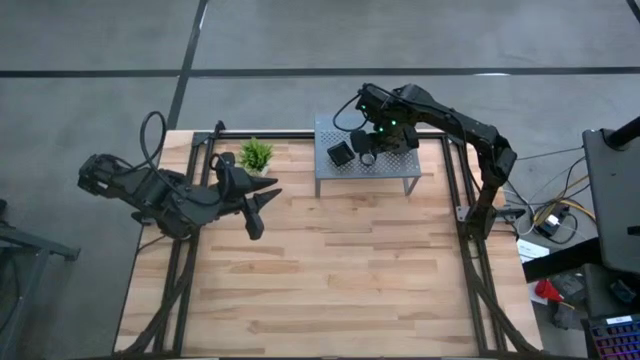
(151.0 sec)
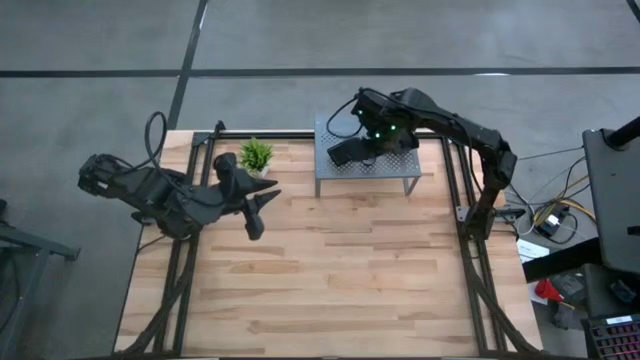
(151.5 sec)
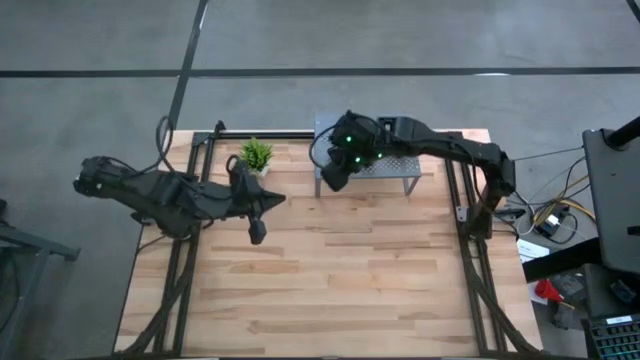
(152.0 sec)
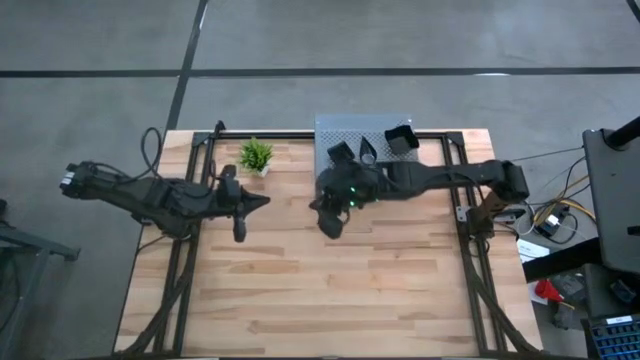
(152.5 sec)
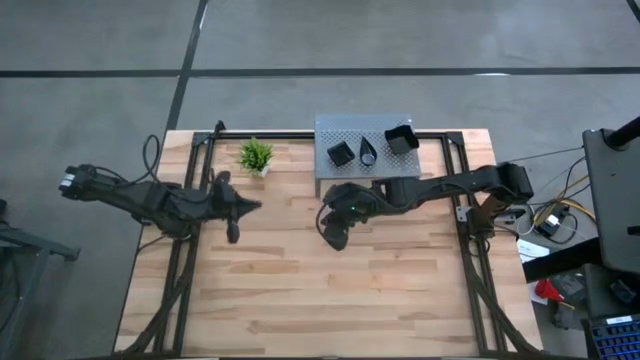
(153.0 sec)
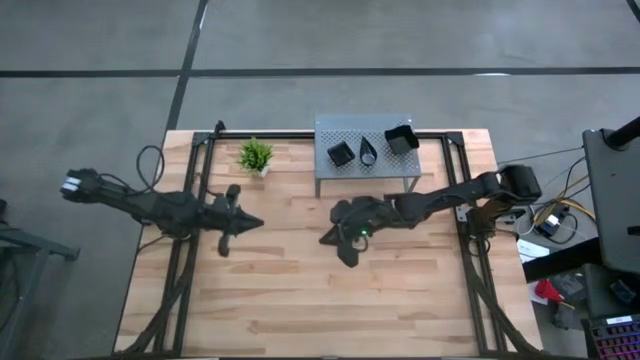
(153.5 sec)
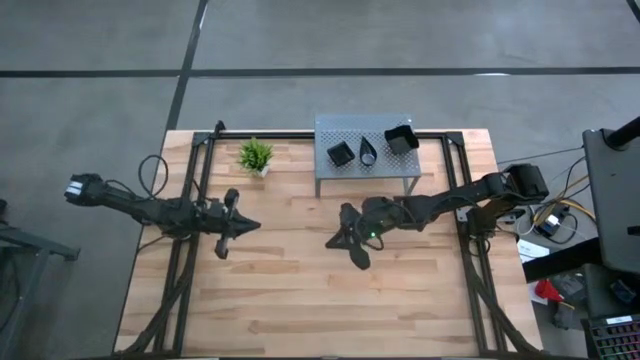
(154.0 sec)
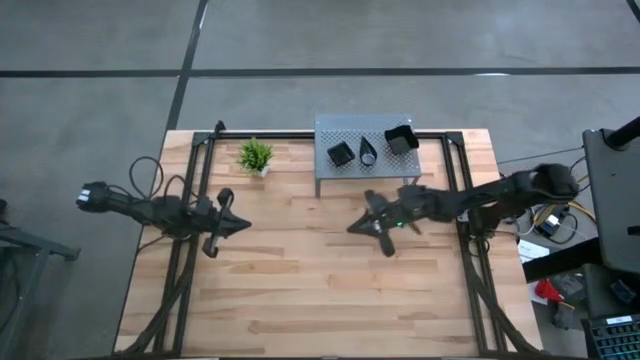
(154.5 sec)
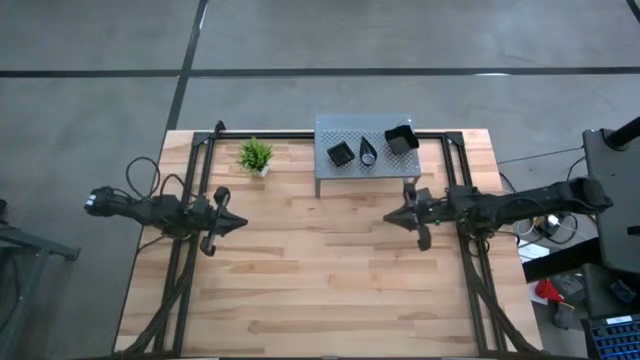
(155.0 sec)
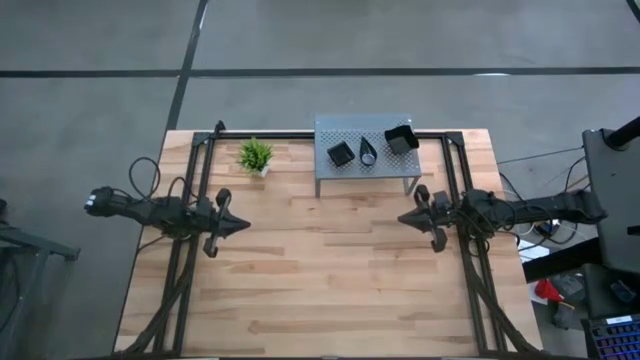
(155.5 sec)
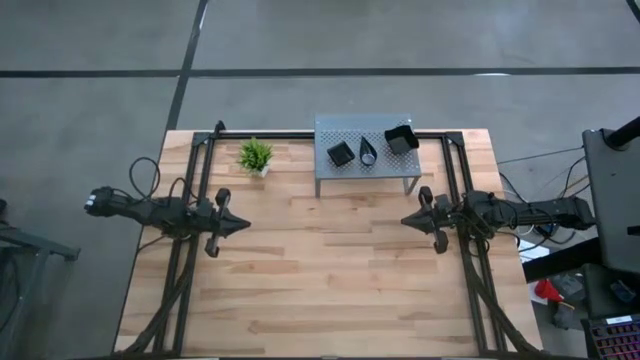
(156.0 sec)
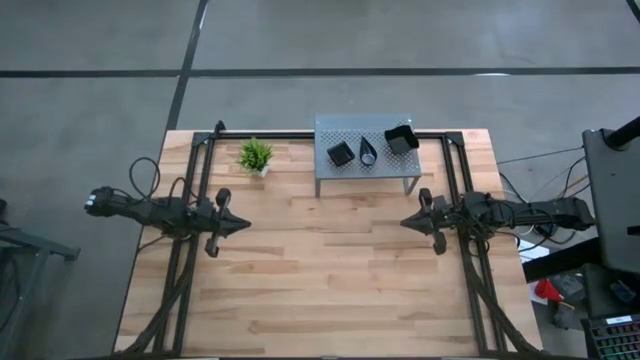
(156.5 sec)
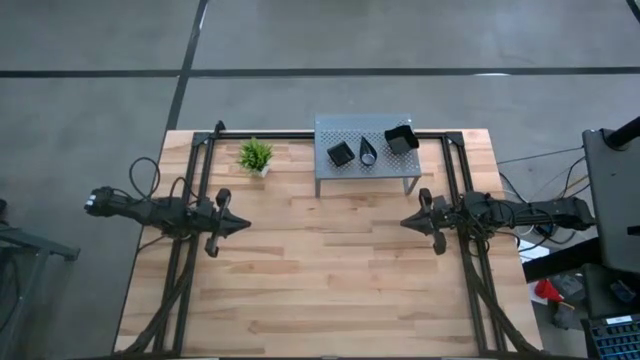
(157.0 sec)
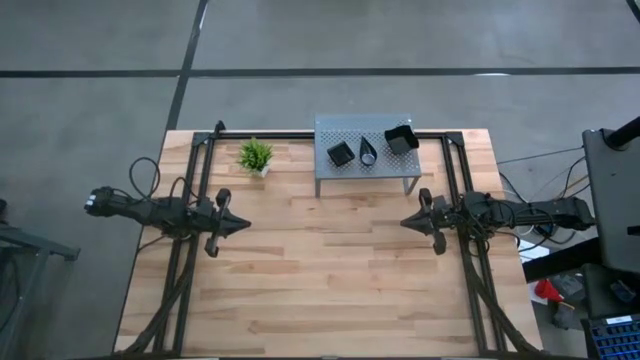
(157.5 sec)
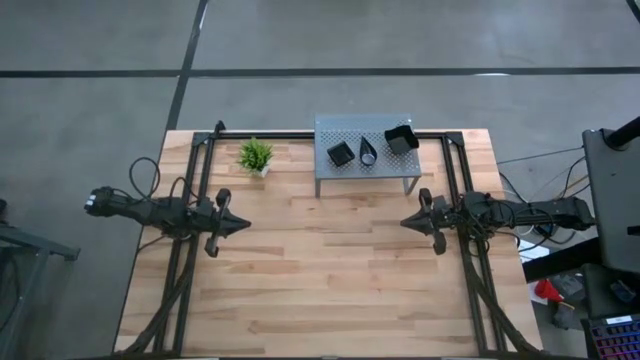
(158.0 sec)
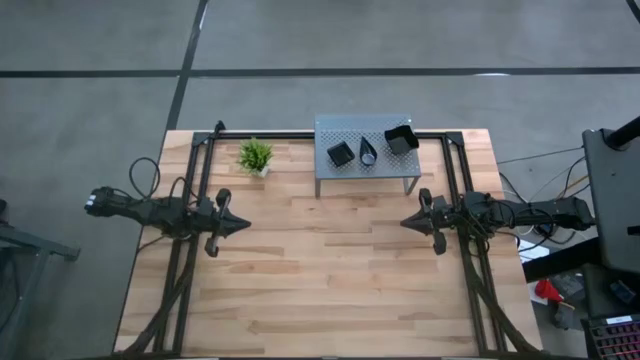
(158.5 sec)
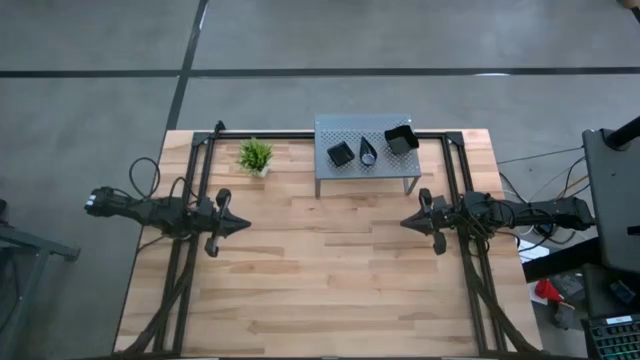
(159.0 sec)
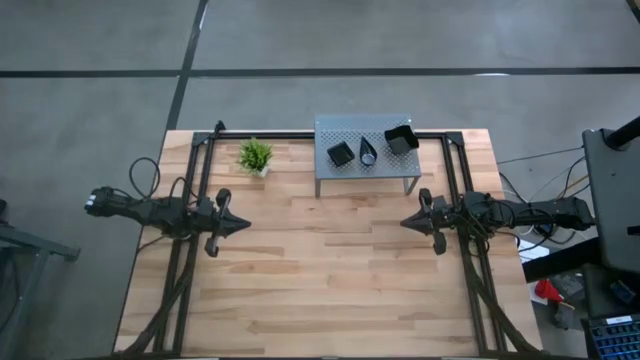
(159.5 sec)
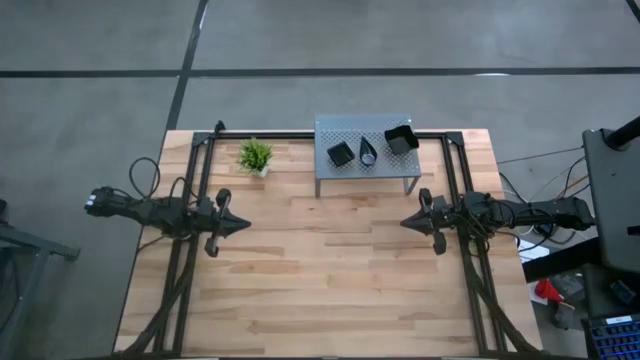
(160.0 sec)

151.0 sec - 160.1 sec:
Task: Pick & Place Mini shaped plates
Return to Home Position

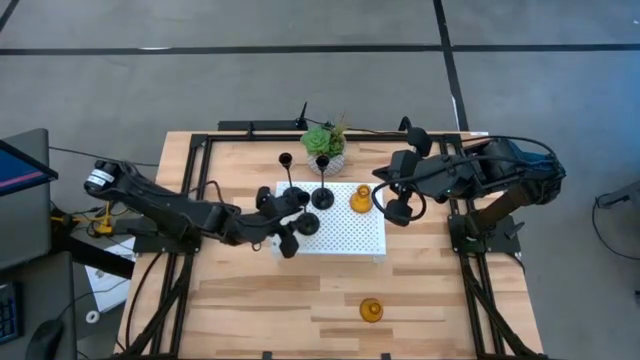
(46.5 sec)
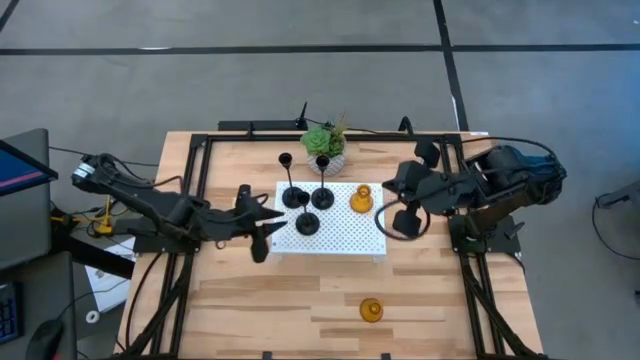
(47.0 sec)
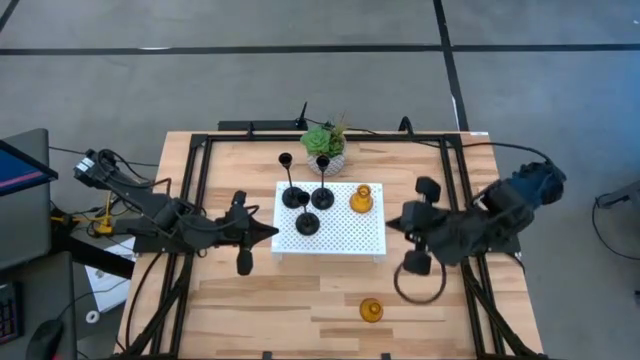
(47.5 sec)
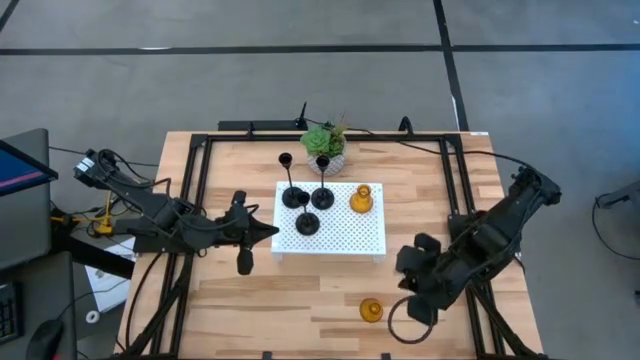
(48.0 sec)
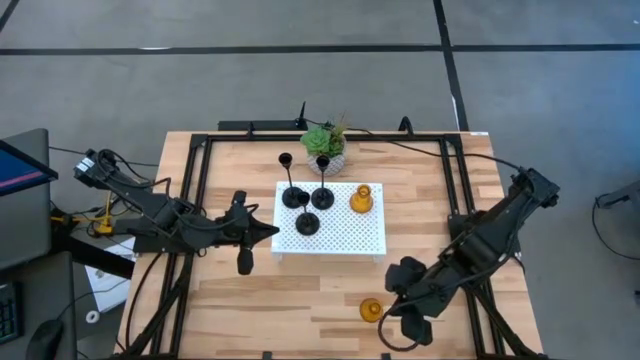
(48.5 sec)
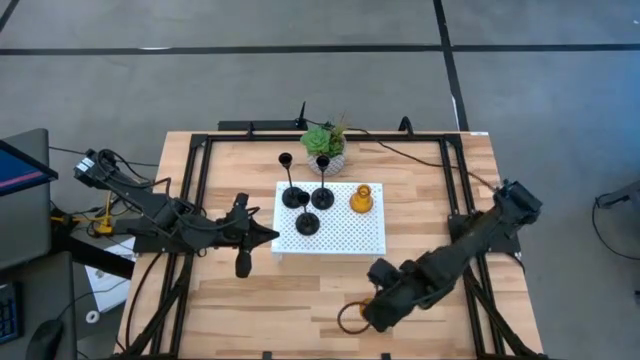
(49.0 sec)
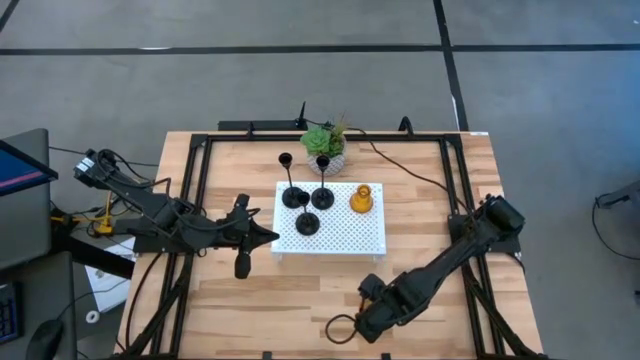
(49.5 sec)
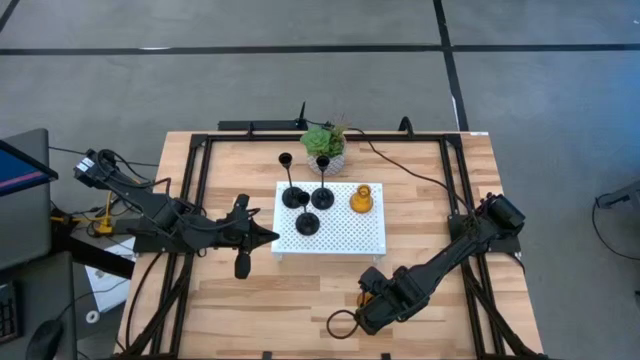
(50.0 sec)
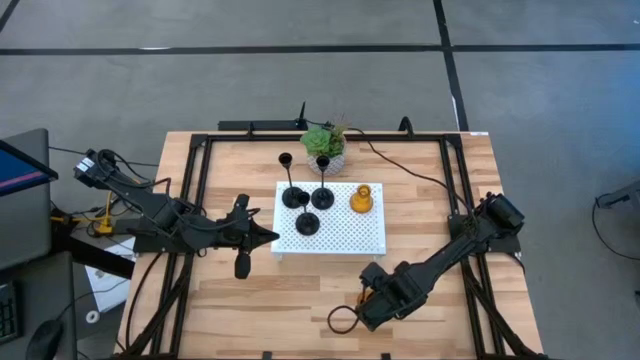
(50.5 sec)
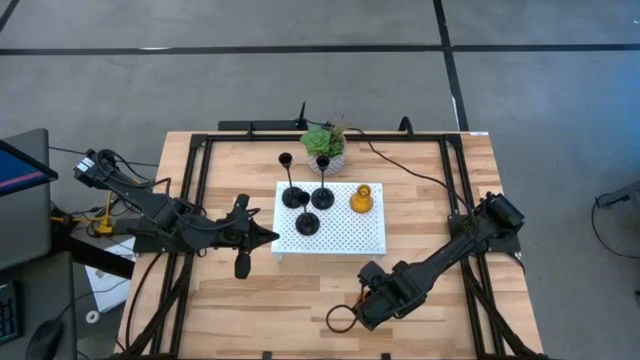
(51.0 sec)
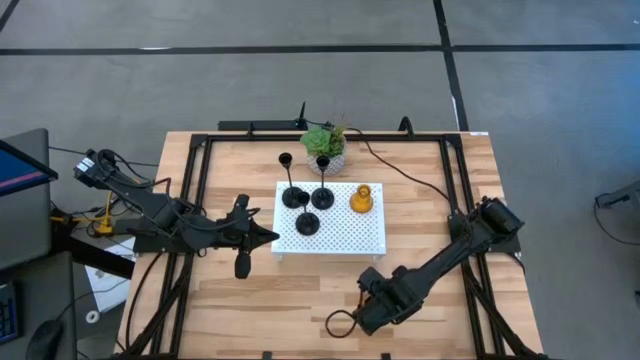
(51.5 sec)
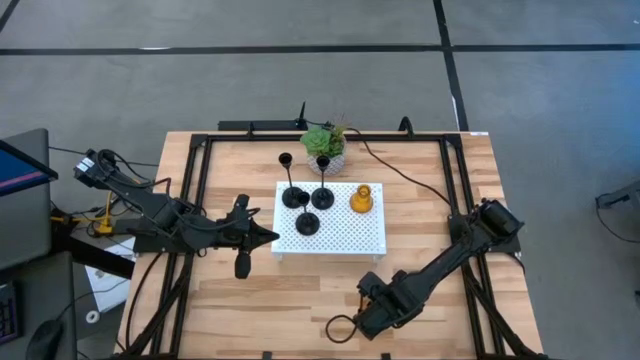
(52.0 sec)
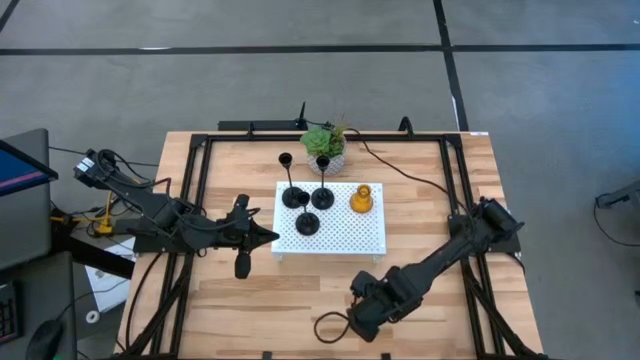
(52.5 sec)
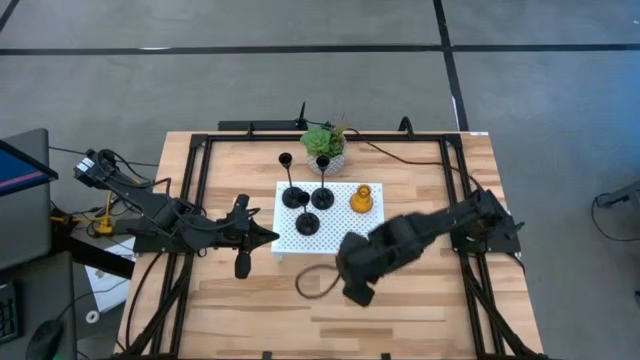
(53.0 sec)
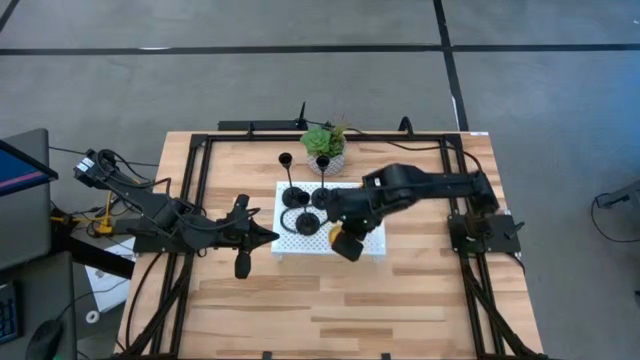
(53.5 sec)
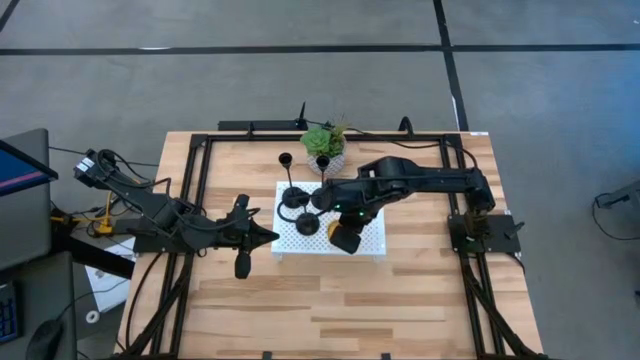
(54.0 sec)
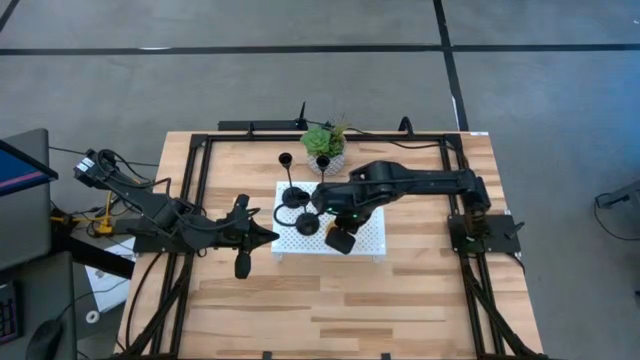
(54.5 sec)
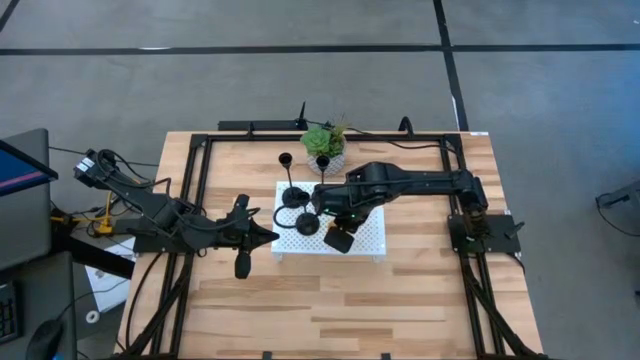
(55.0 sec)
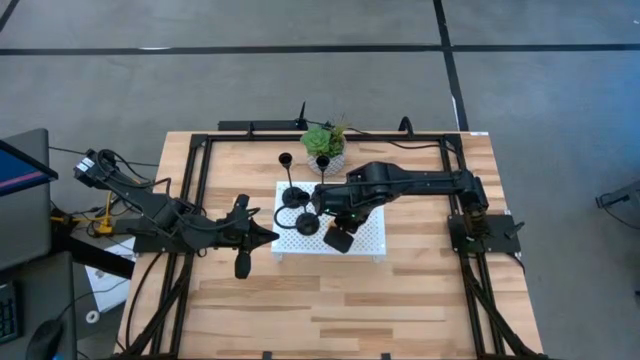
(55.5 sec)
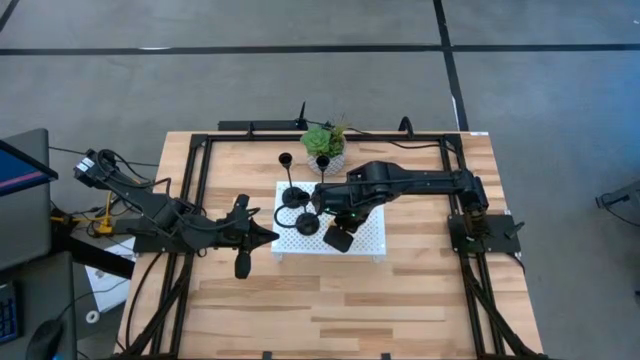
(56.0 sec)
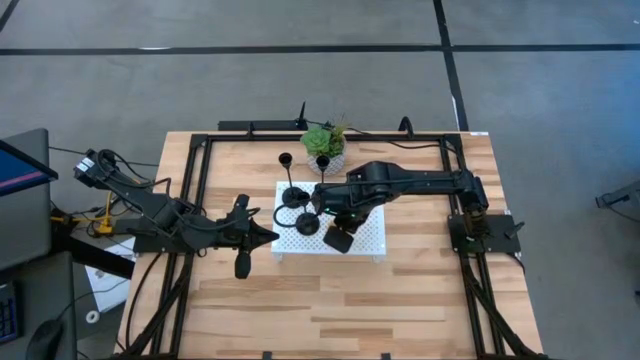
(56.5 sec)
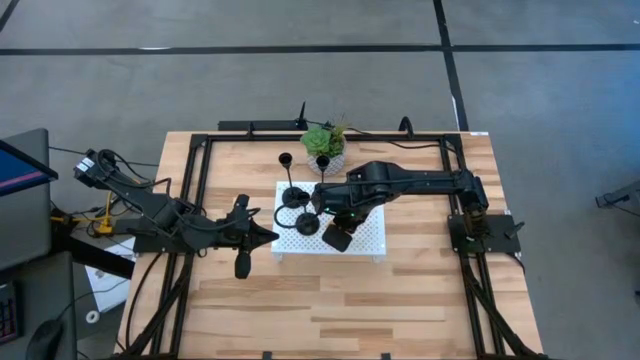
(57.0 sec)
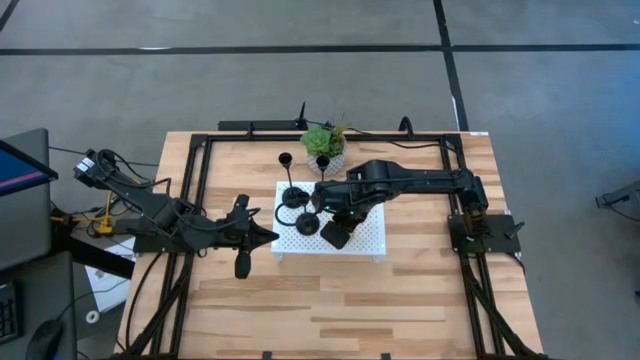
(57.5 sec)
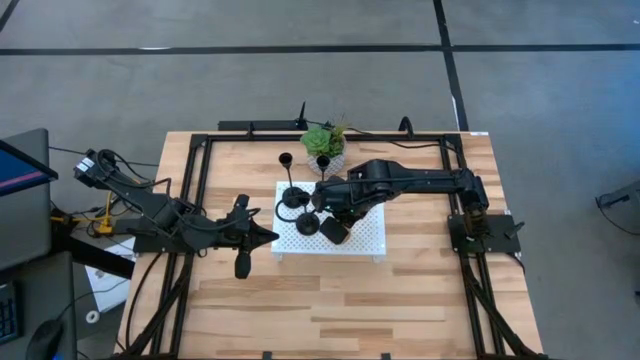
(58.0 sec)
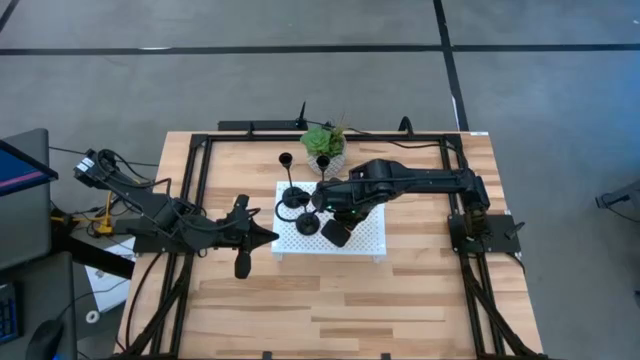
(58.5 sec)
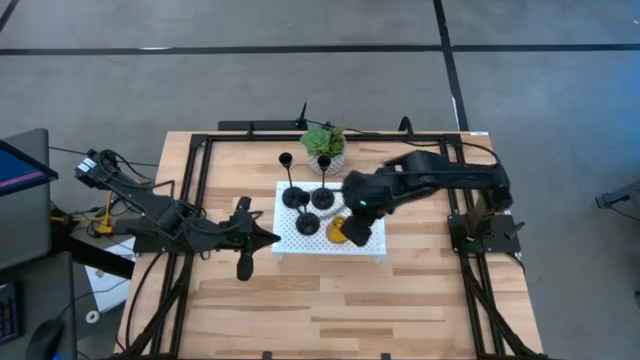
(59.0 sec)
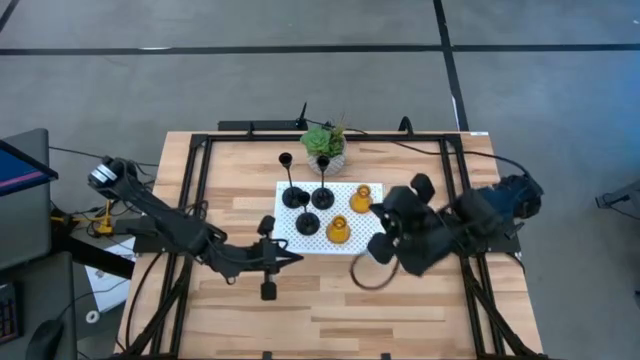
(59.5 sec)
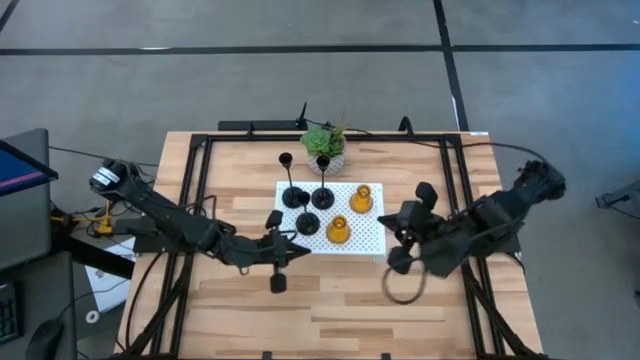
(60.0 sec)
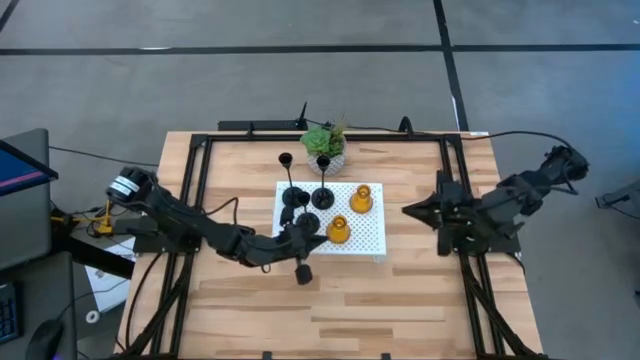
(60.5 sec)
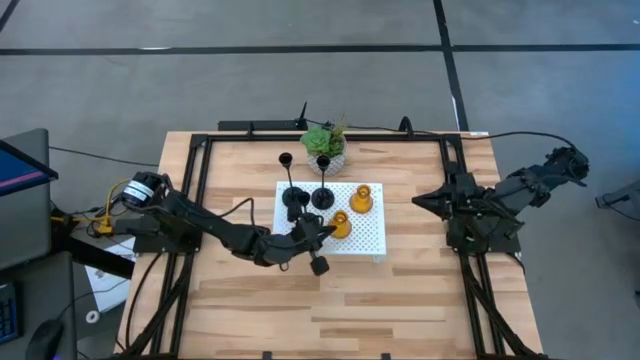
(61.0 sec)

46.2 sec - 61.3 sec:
Task: Pick & Place candle stick holders
Put the gold vase on the shelf
